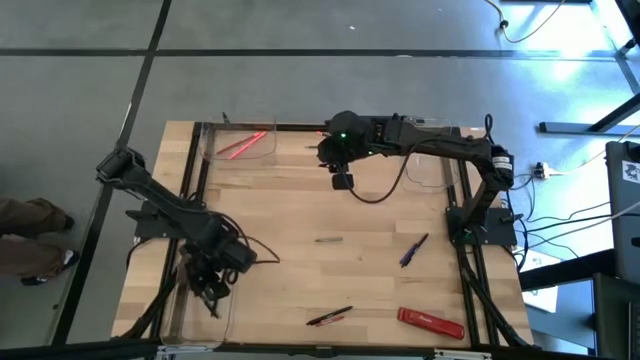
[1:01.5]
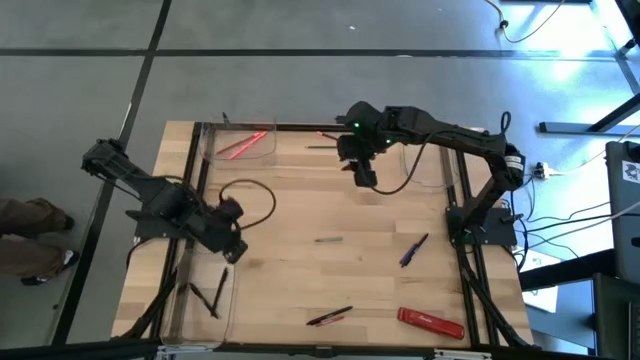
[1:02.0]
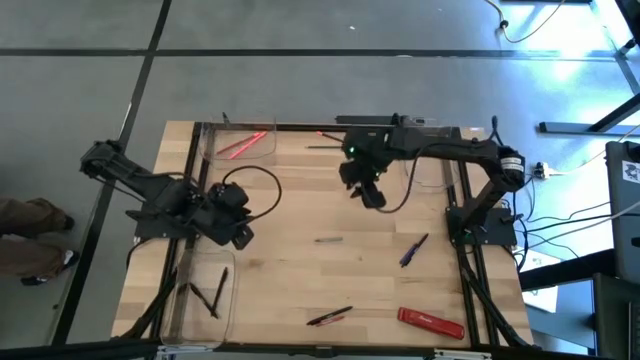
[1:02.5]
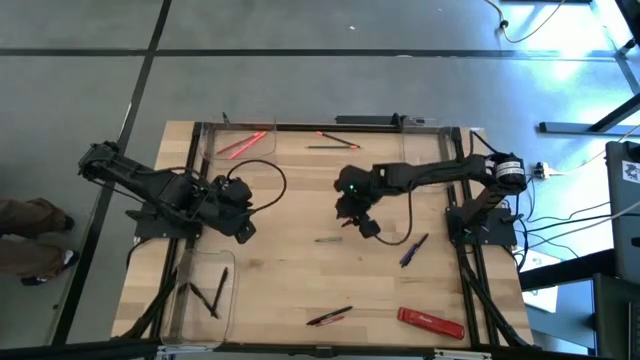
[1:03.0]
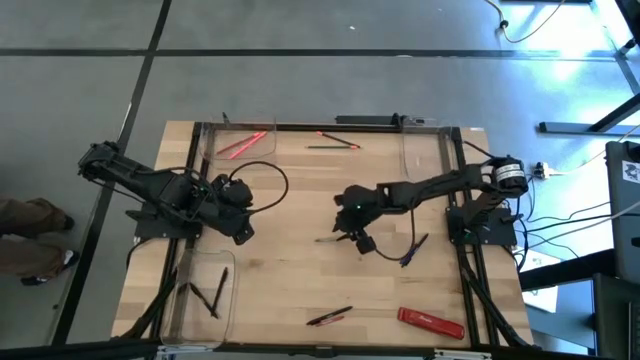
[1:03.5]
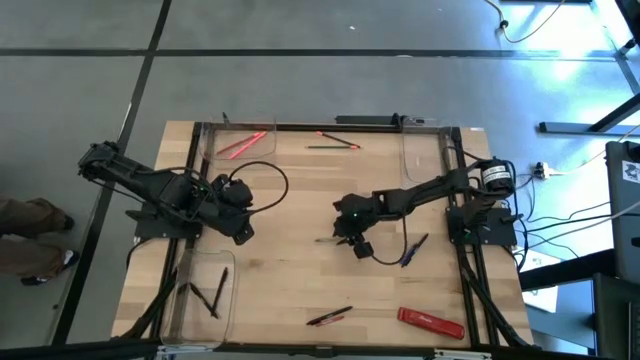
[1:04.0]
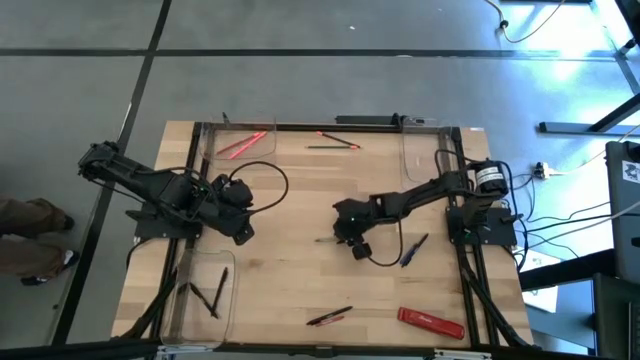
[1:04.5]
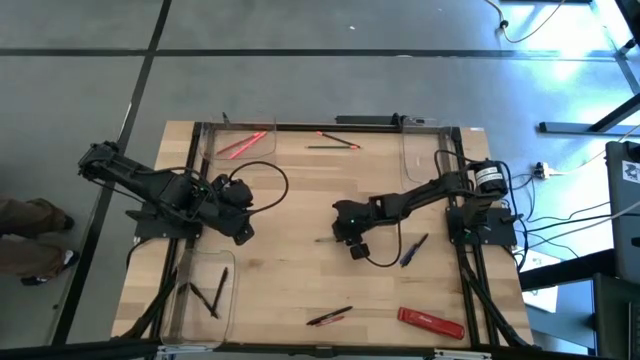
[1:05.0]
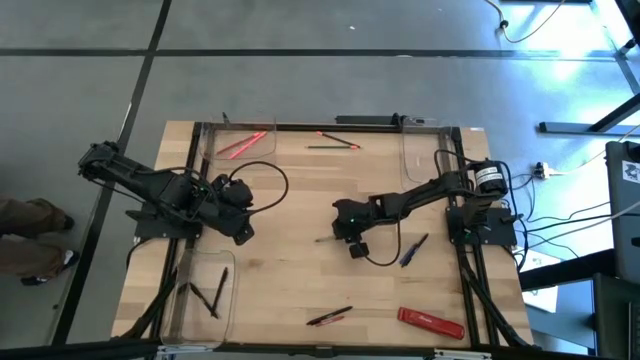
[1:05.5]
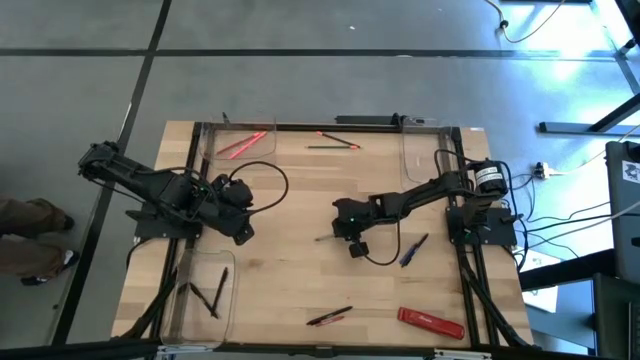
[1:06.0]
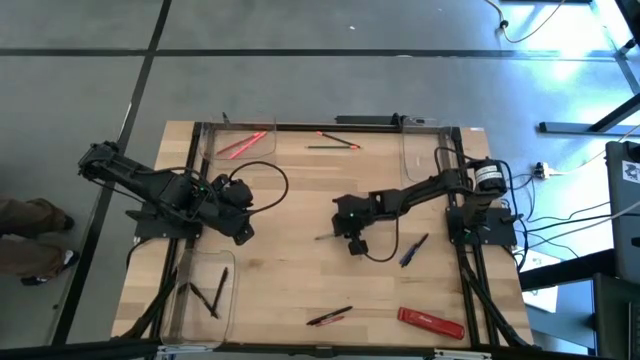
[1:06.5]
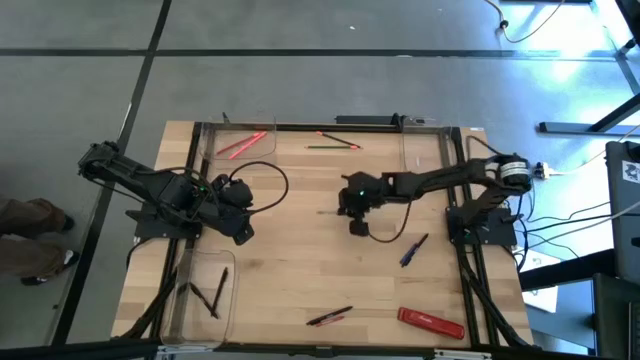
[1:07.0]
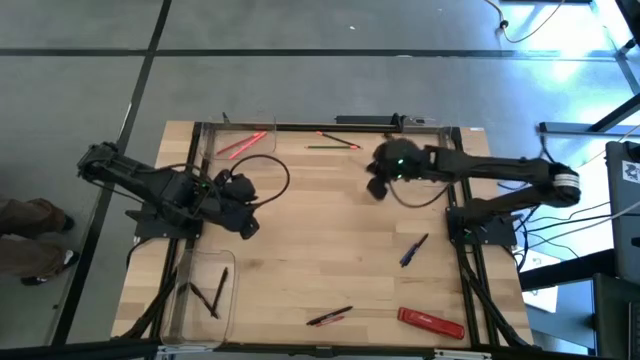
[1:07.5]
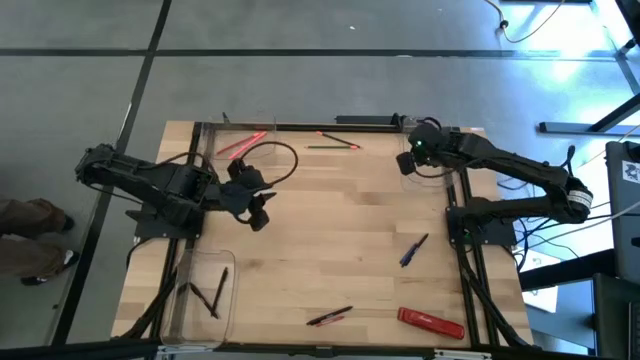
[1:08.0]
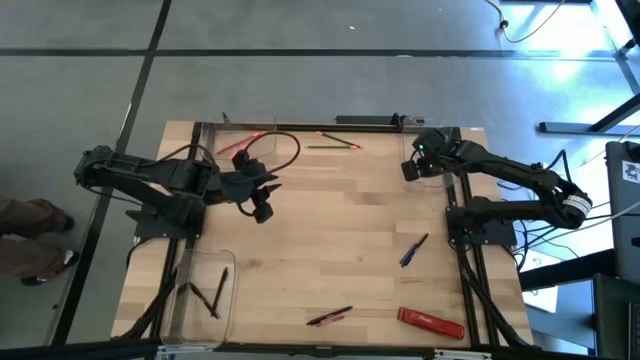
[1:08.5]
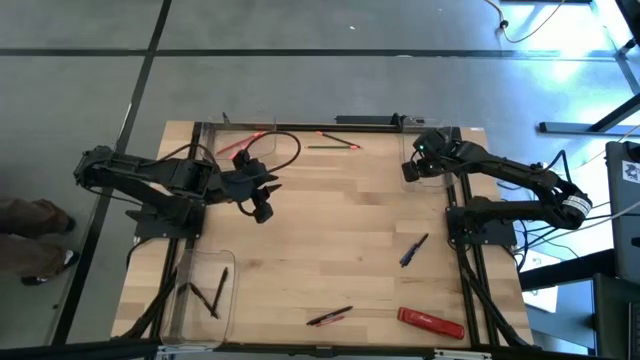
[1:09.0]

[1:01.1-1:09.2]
Task: Sort crayons/erasers/pens/pencils in bins
Put the gray crayon into the top right transparent bin

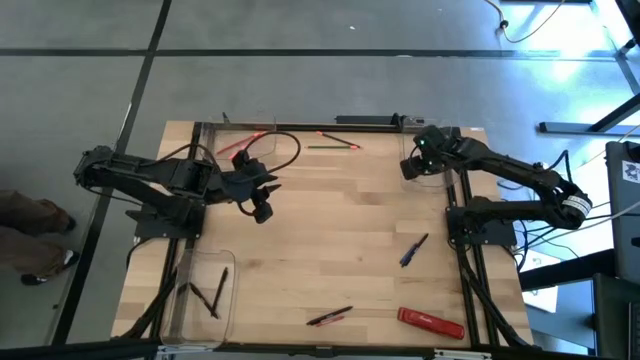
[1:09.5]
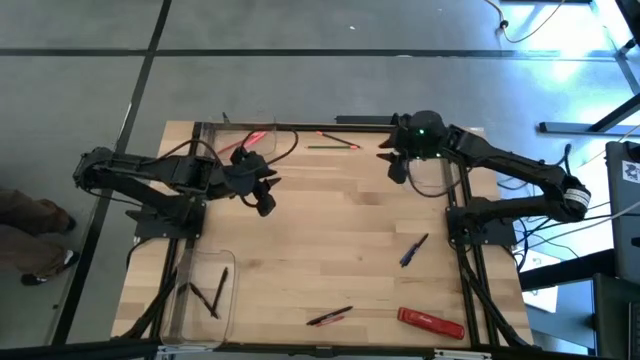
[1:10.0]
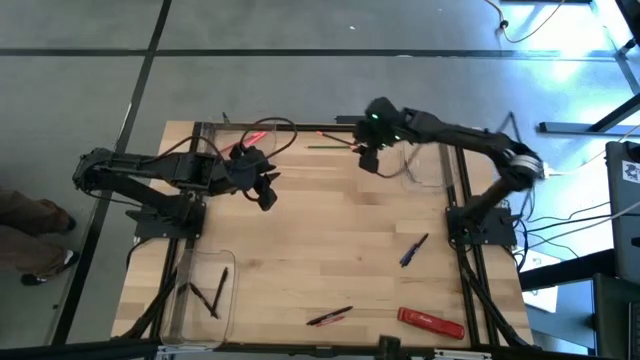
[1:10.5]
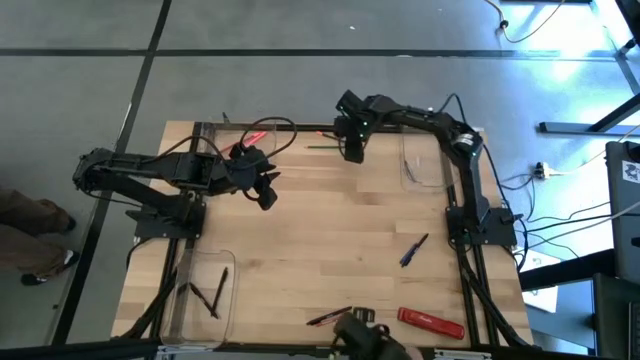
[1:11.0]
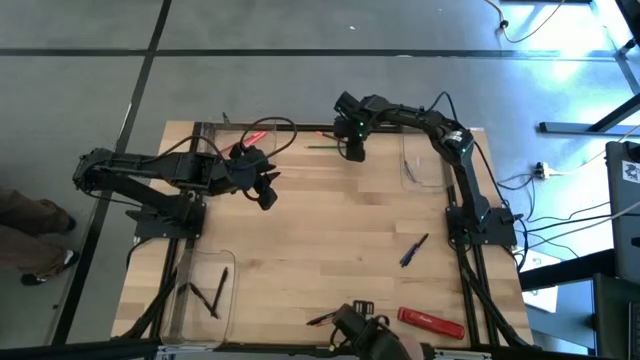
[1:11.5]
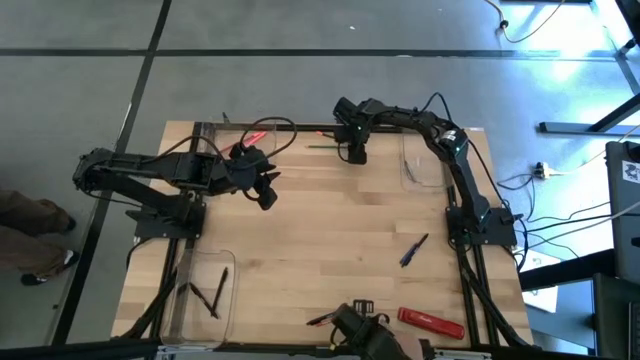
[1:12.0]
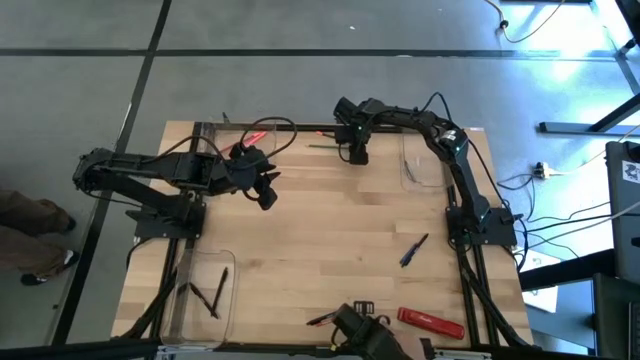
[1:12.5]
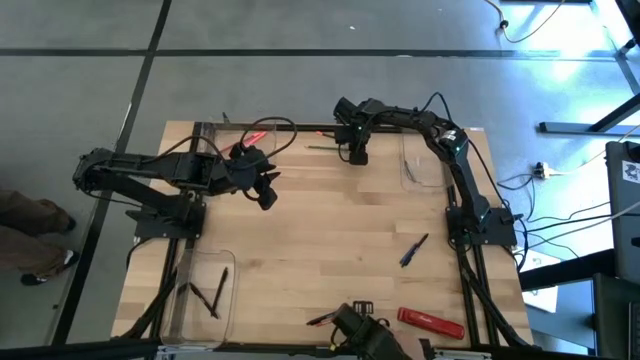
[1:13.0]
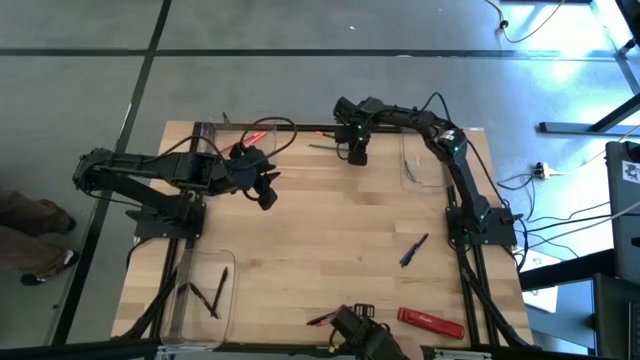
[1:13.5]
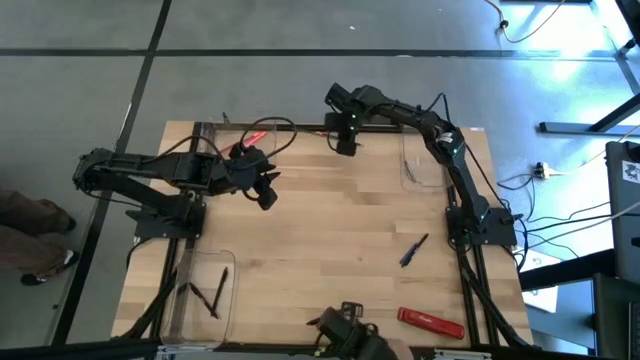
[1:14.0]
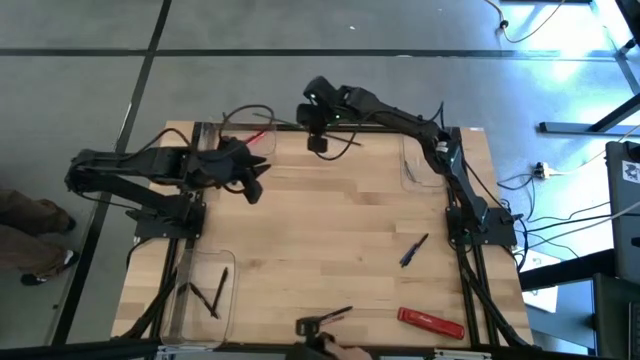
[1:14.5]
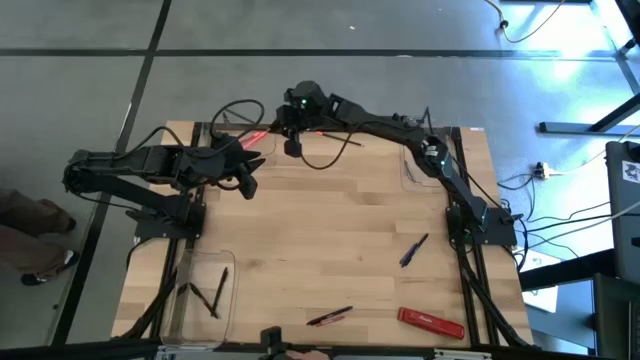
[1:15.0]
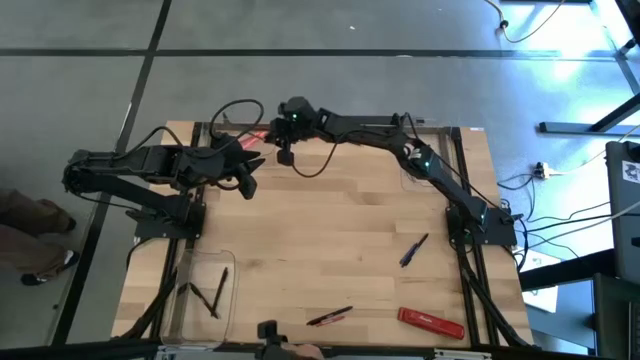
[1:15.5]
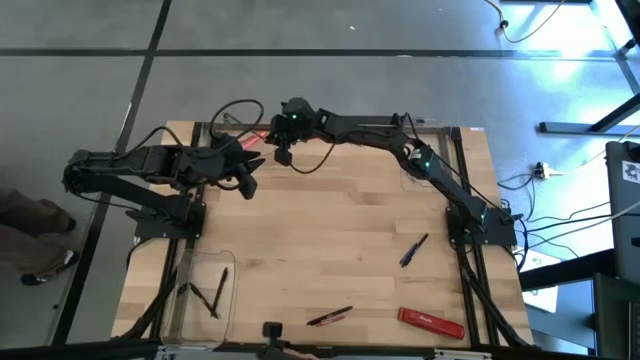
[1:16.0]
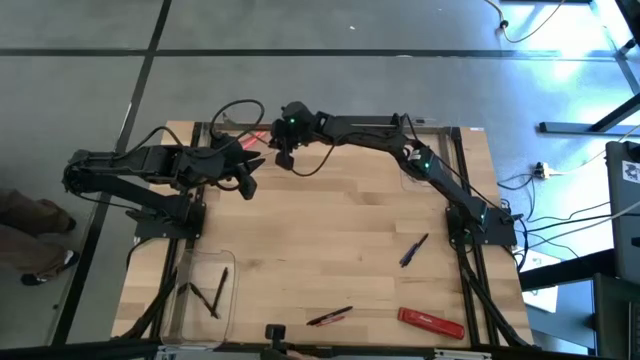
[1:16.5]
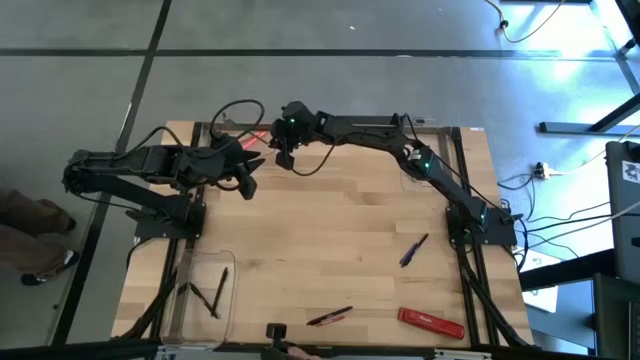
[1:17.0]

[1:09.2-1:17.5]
Put the green pencil into the top left transparent bin

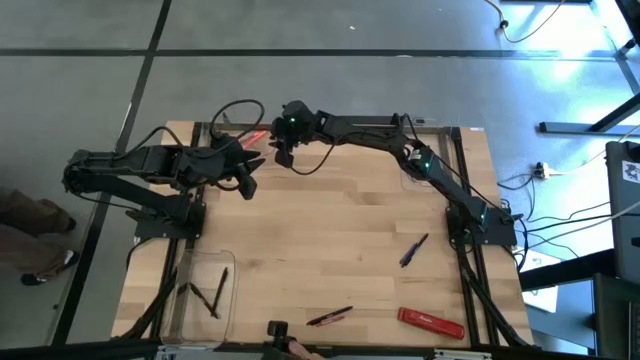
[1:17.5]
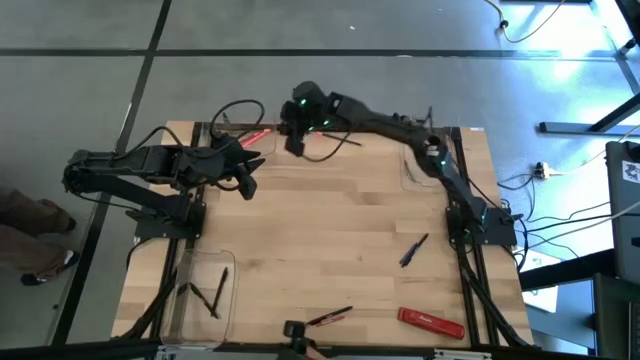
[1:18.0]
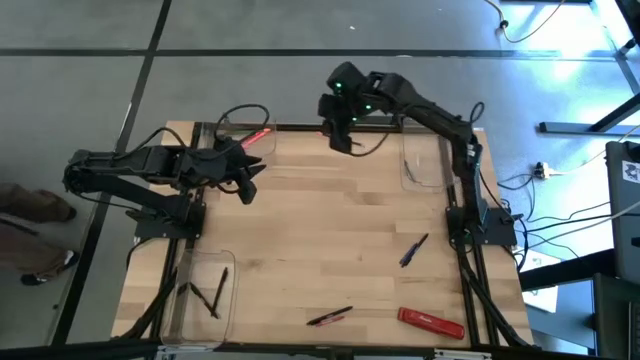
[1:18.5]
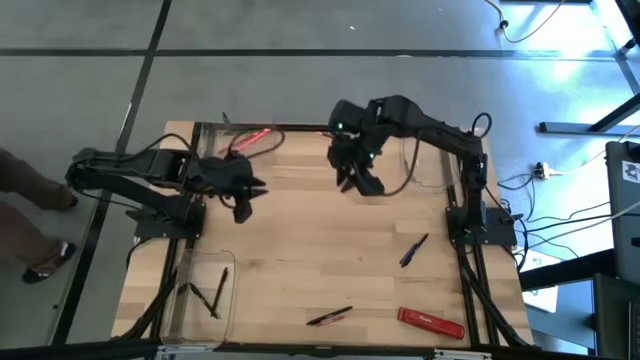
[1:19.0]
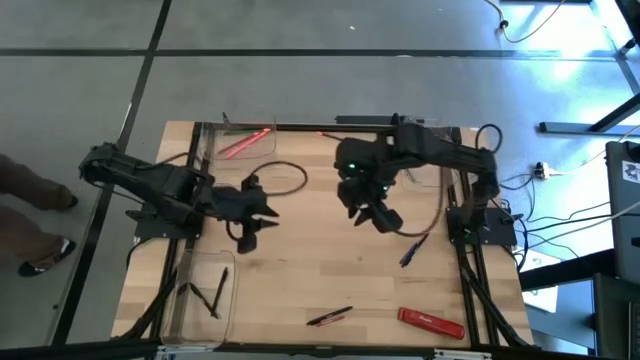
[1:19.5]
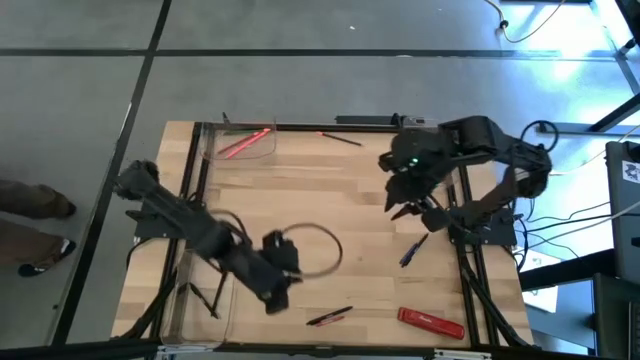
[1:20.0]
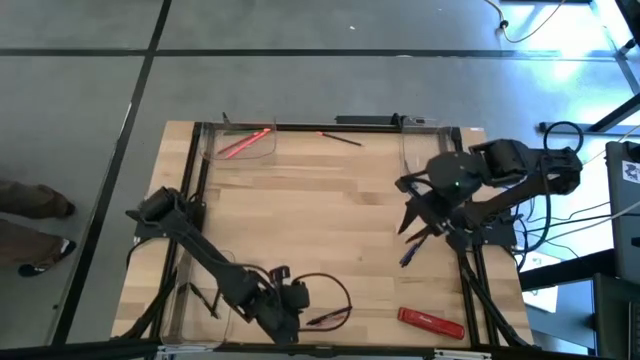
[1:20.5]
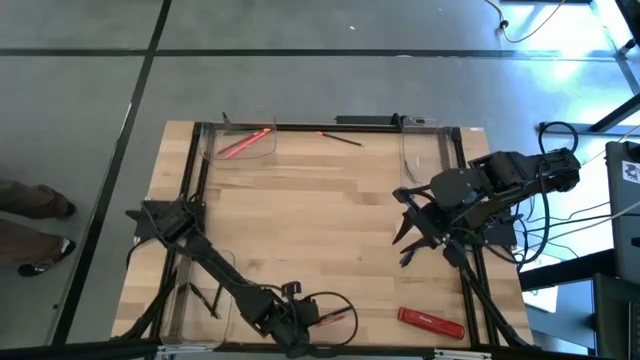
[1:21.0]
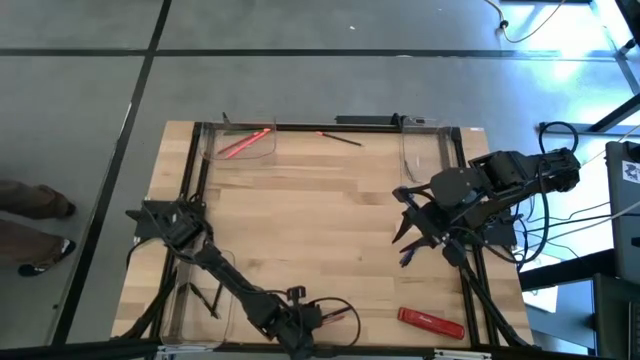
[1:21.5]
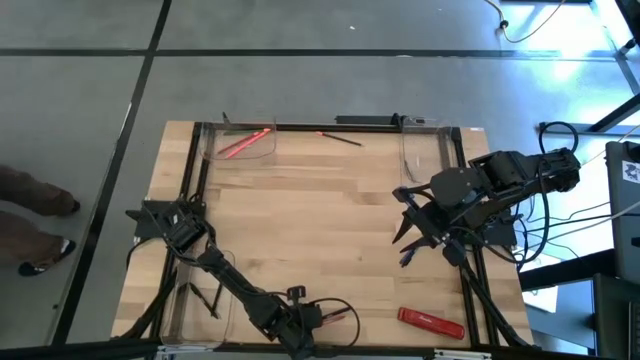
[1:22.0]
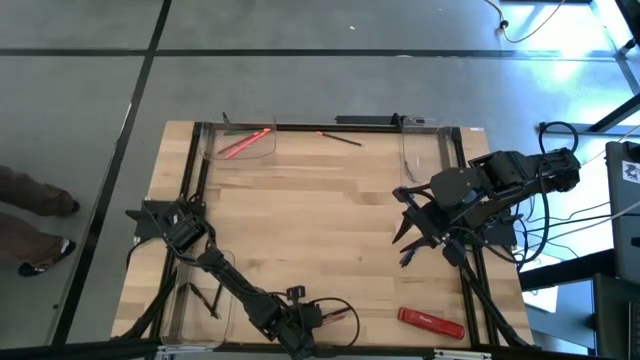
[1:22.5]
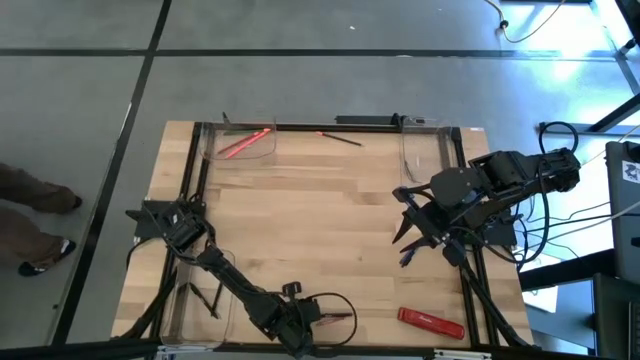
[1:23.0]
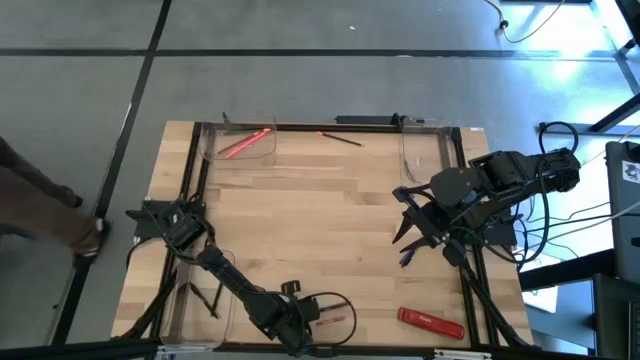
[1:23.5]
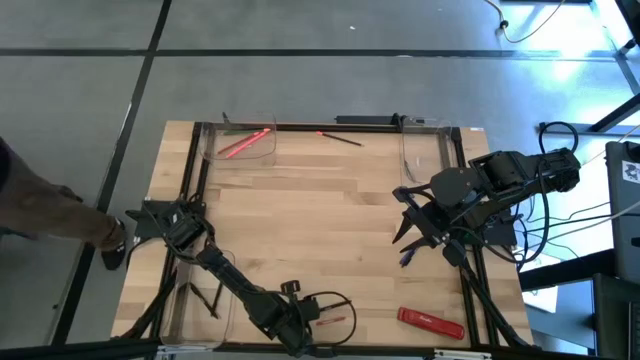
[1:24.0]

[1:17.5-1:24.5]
Put the black pen into the bottom left transparent bin
